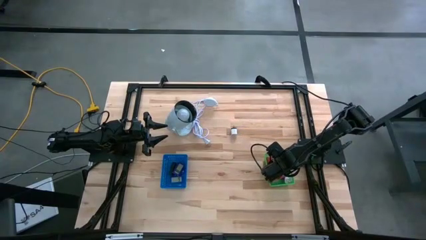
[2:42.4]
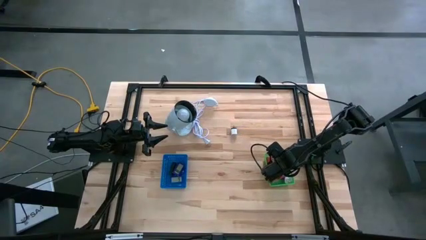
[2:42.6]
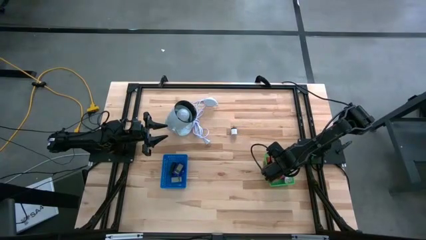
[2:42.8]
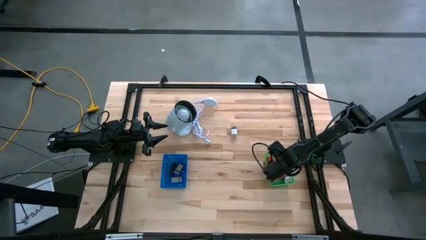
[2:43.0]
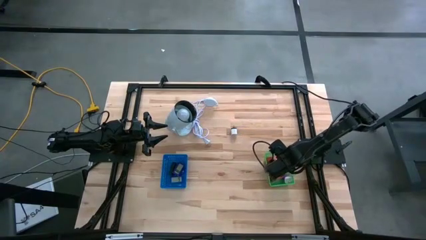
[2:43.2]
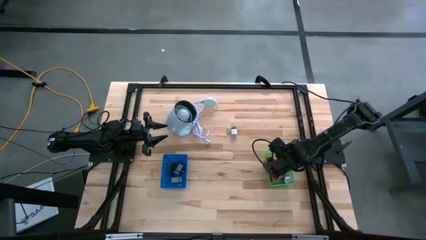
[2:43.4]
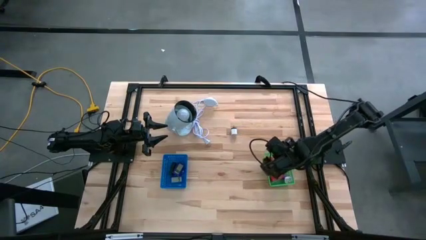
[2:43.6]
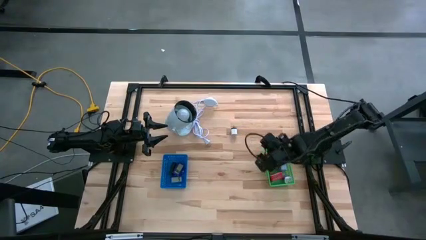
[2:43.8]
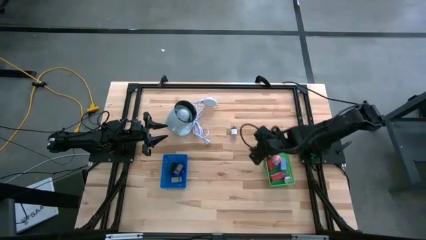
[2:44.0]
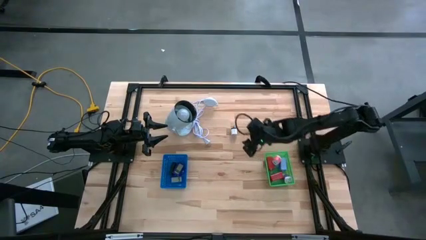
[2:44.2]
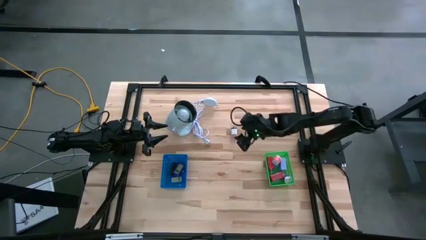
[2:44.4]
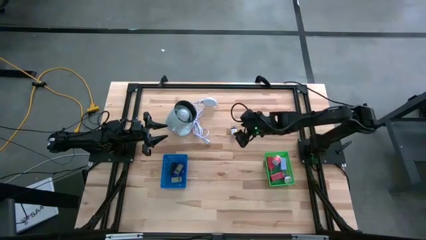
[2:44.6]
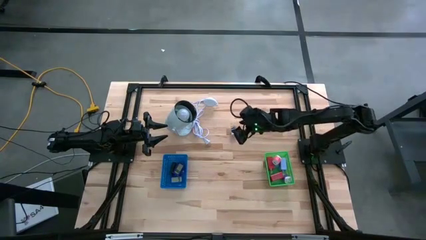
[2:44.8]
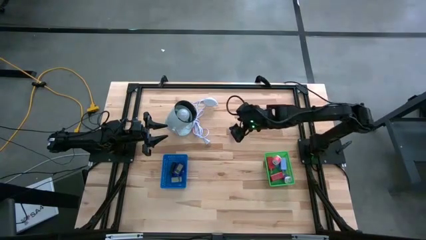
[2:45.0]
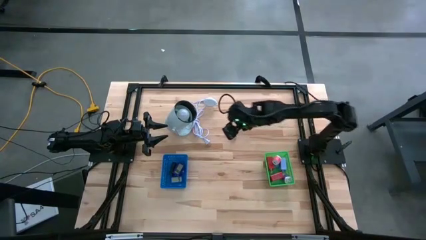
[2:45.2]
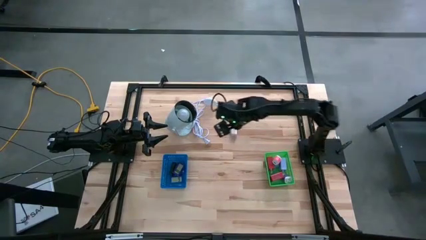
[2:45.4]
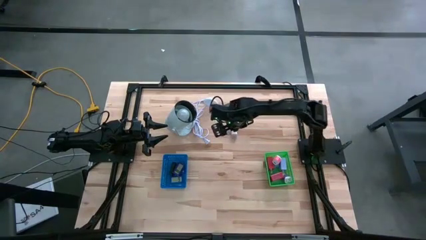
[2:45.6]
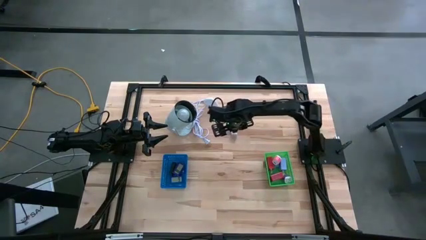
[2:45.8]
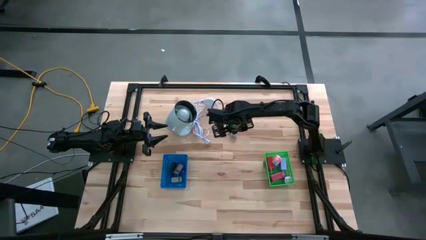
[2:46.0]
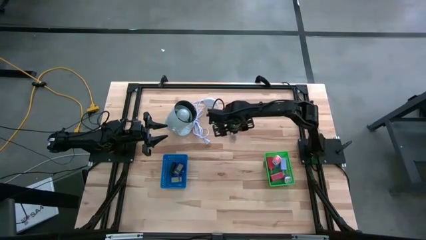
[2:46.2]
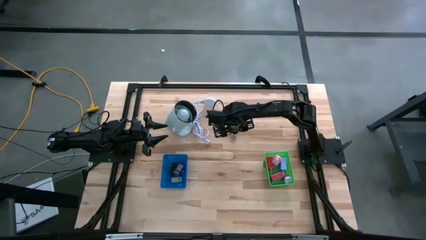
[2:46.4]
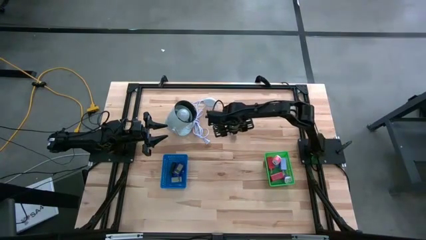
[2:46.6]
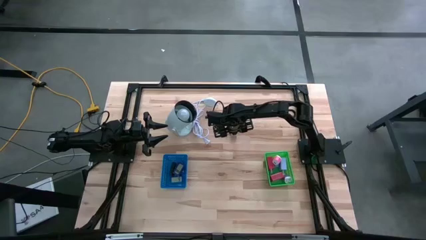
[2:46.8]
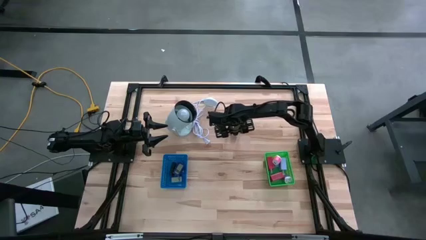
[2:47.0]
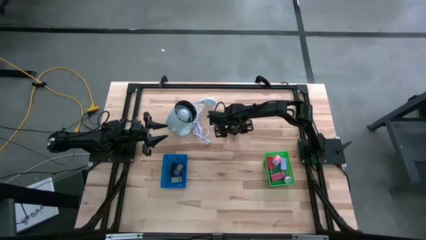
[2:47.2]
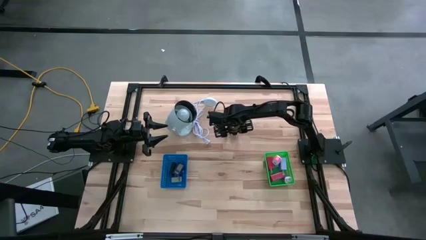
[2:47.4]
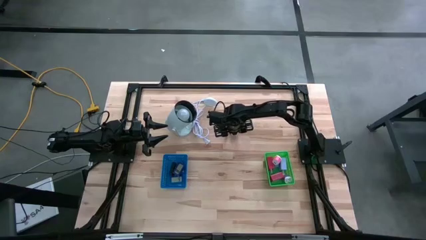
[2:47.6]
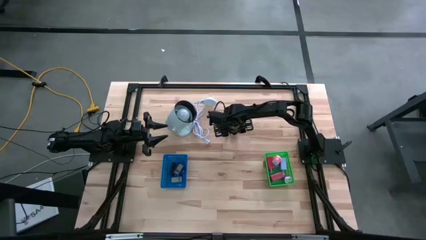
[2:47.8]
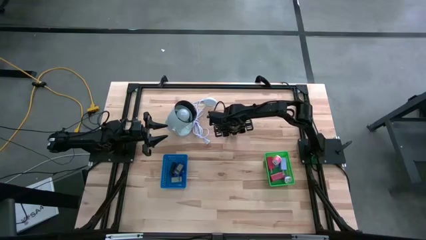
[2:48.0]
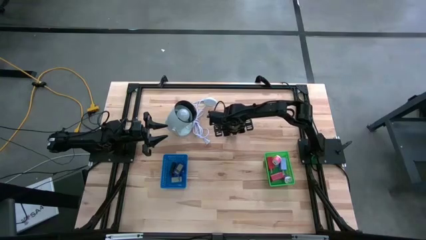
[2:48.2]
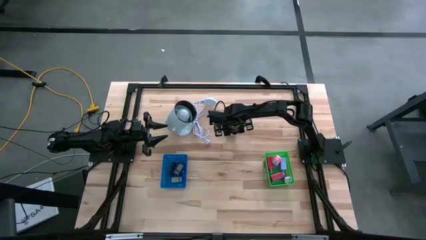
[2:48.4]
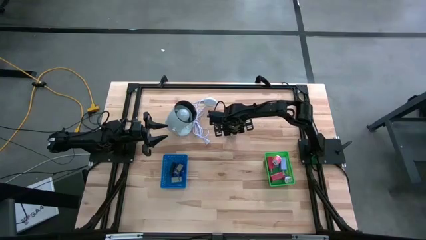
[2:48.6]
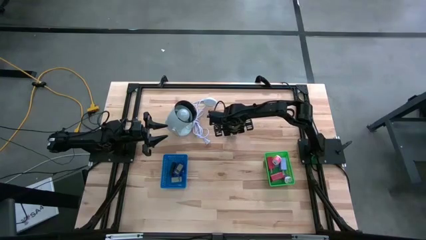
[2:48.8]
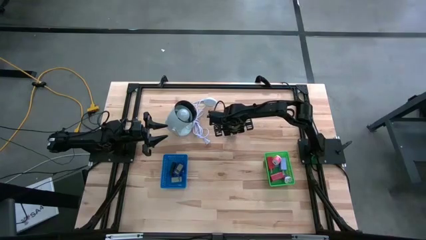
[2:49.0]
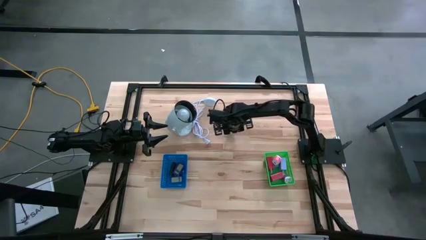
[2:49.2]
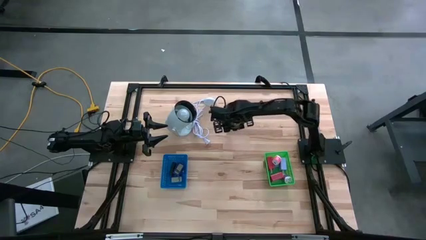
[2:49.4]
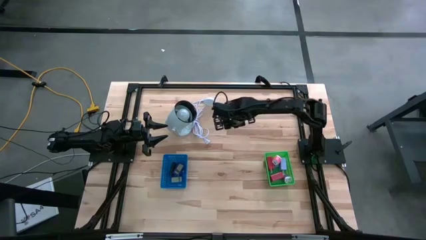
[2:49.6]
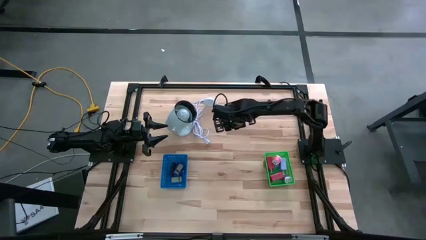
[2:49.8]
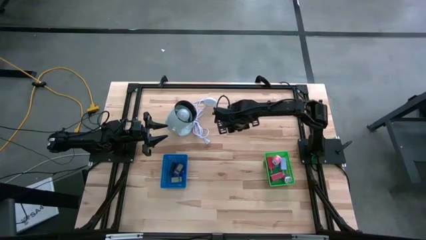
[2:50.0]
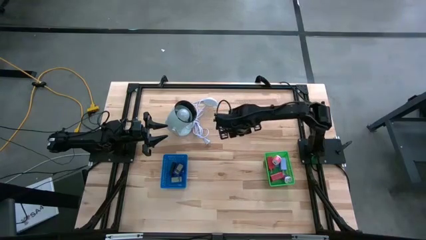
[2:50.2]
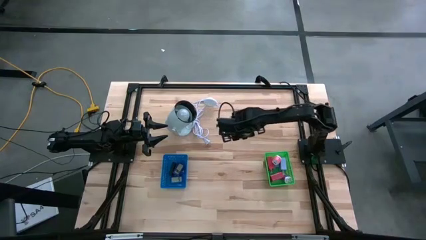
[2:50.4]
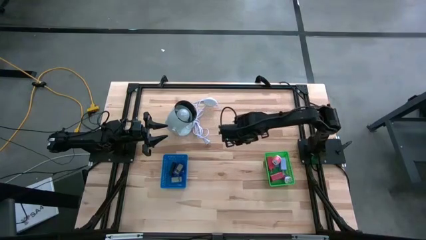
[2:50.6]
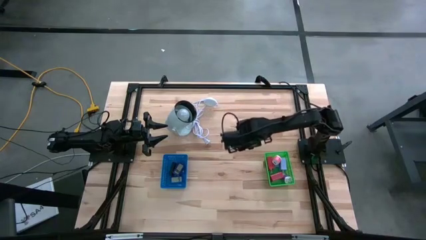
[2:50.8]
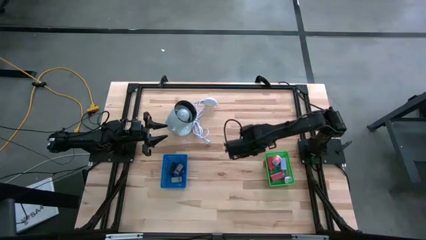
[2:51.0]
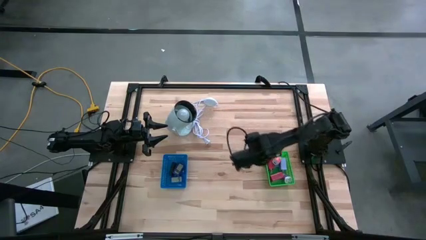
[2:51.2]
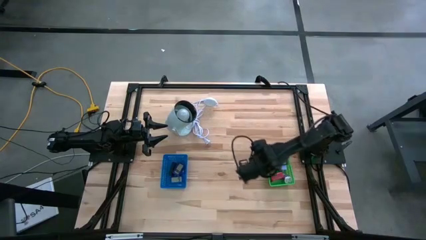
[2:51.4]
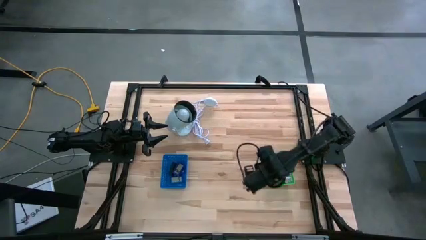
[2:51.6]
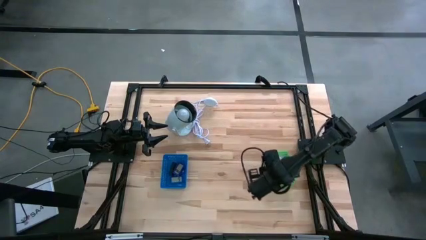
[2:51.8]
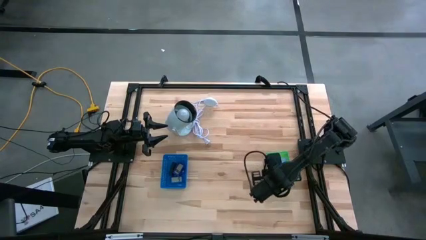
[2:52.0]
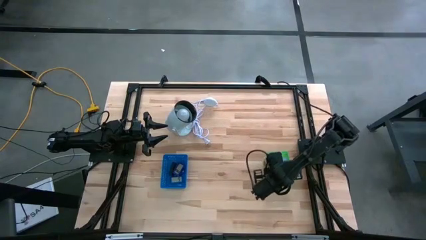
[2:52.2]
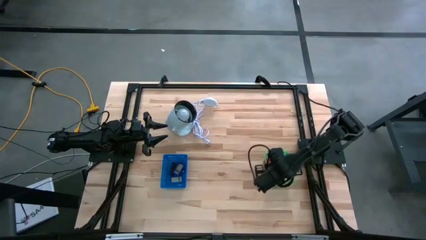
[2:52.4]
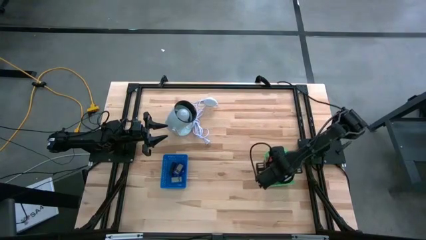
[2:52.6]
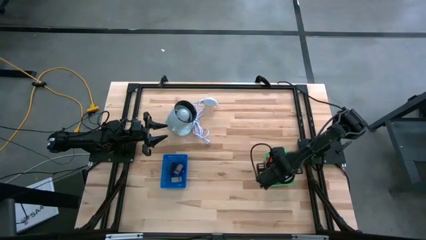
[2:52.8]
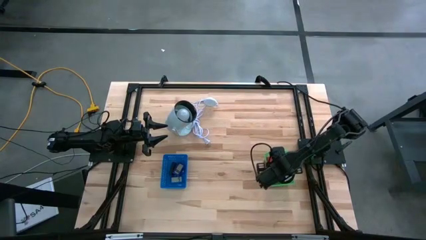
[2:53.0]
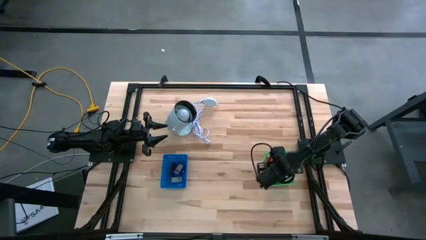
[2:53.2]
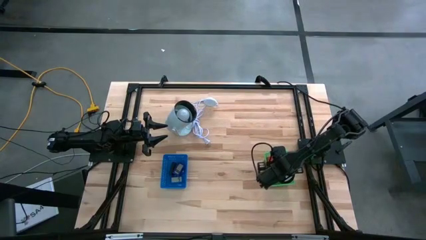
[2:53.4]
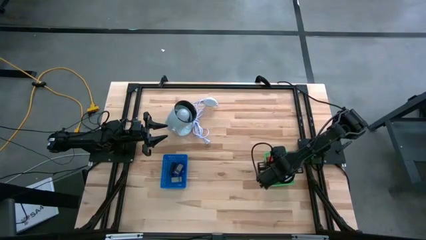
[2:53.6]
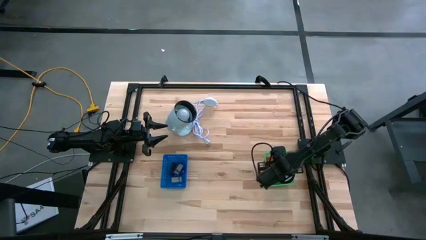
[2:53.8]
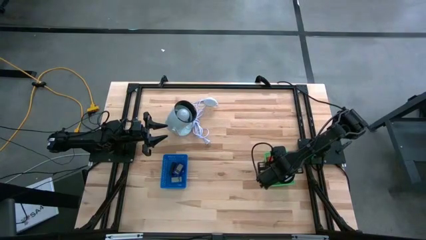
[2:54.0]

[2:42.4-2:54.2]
Task: Pick & Place Office items
Put the white charger adapter into the green bin

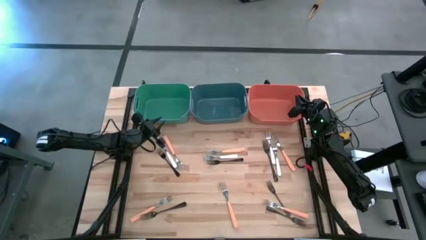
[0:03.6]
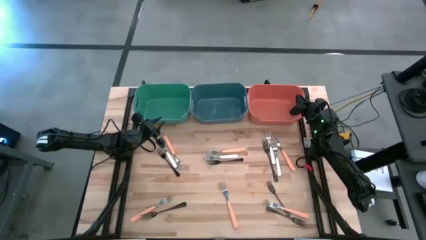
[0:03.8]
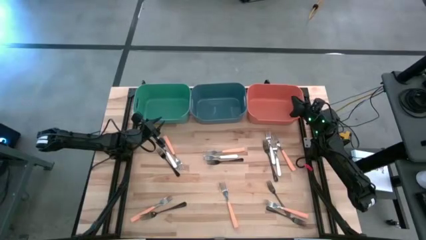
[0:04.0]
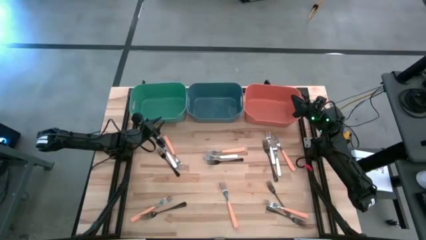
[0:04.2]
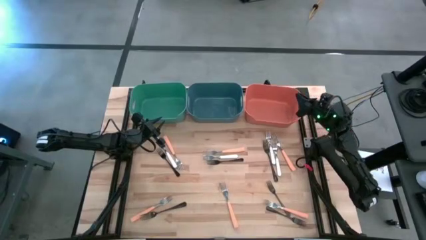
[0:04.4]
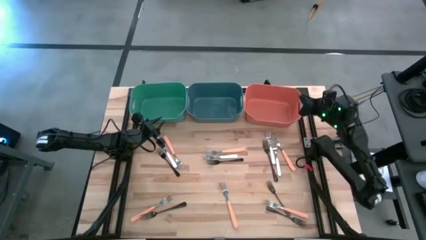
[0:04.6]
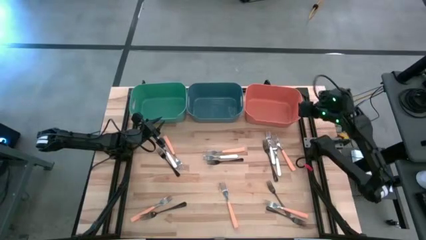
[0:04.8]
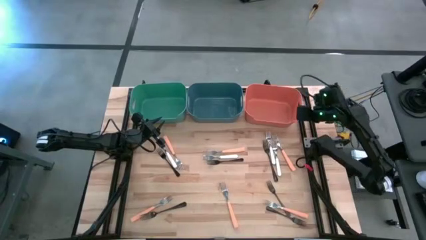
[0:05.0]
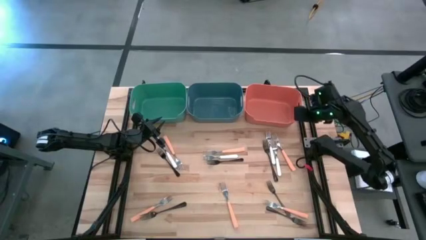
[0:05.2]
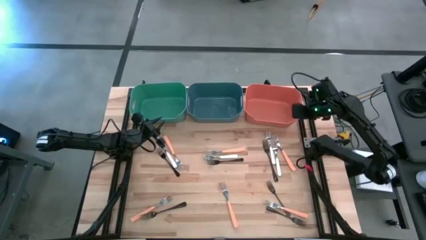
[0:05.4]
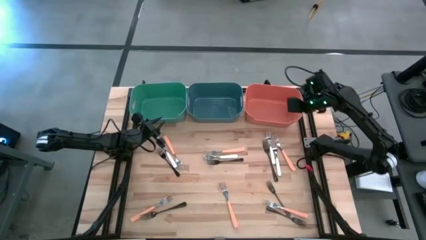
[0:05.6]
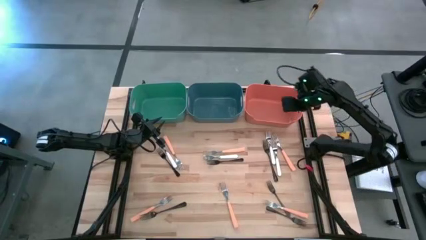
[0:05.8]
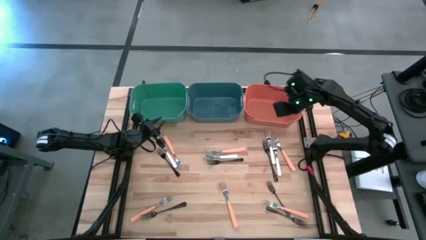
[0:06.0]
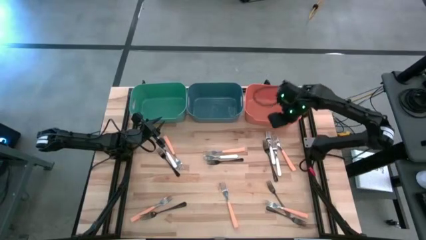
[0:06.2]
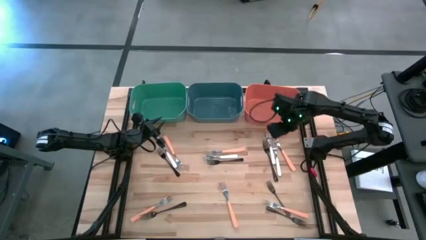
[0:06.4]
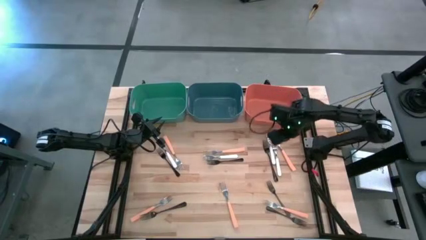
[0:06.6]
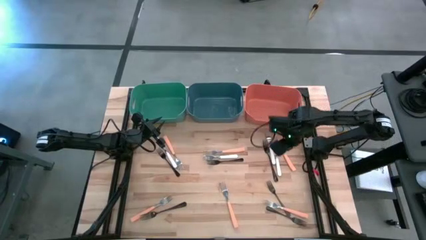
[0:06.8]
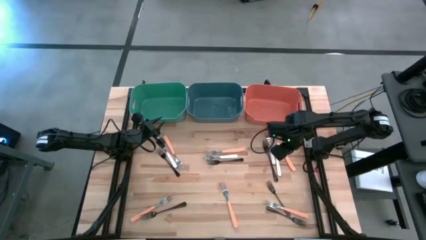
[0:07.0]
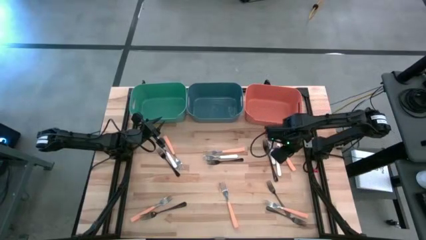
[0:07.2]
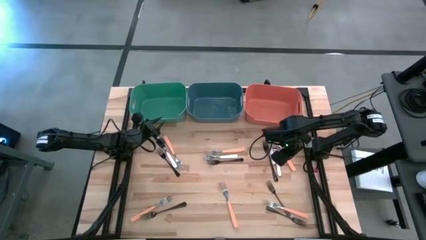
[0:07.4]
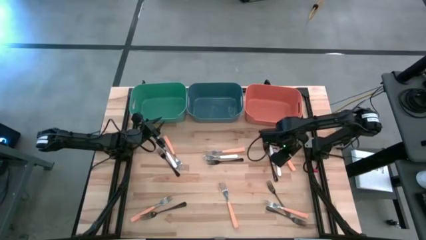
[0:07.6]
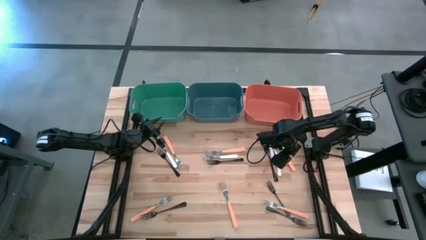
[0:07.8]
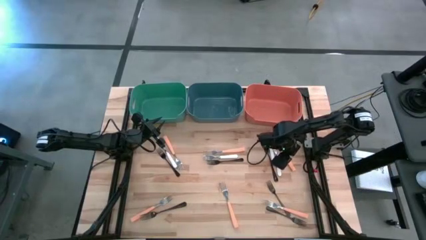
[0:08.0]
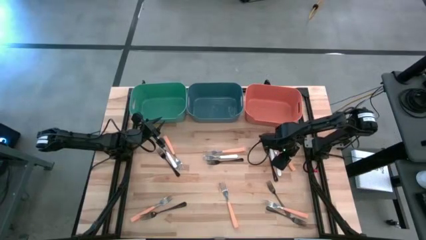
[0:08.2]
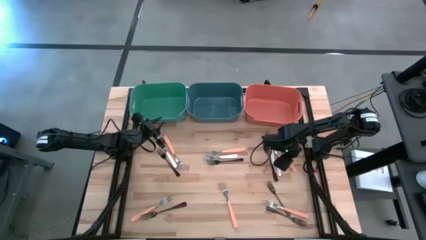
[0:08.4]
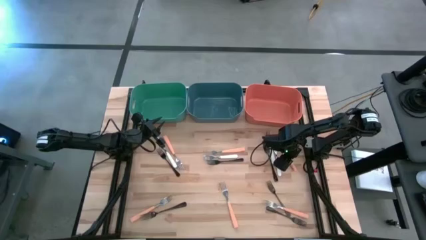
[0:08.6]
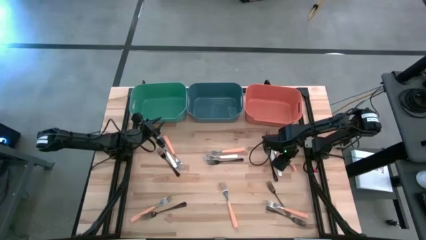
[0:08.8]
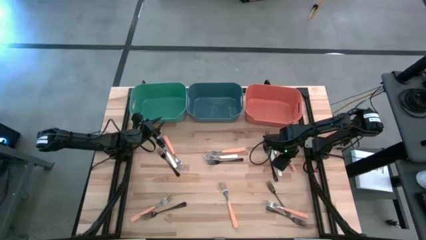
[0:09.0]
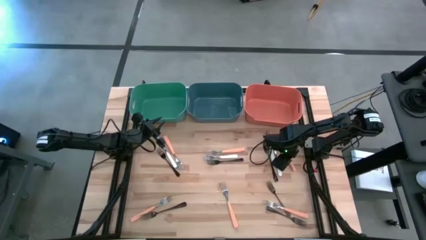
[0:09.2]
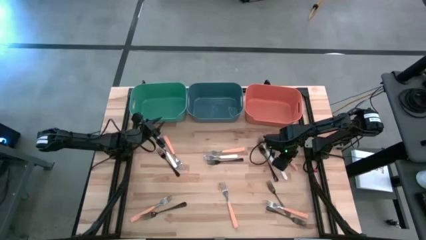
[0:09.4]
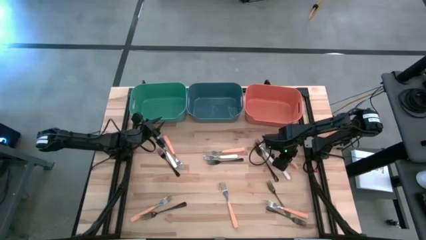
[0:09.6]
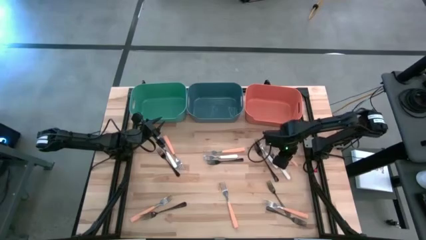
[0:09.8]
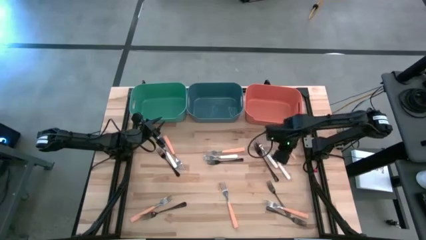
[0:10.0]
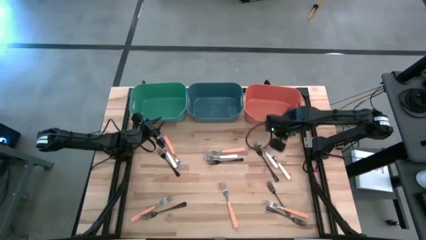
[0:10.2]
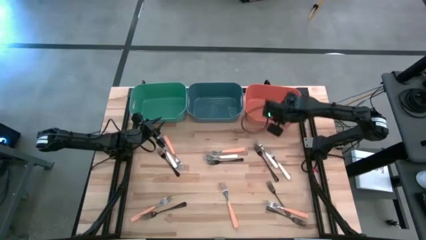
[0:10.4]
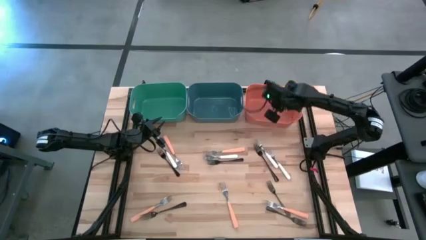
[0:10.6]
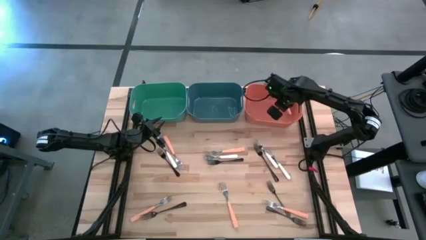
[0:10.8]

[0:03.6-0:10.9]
Task: Sort silverware by color (type)
Put the orange fork into the orange bin
